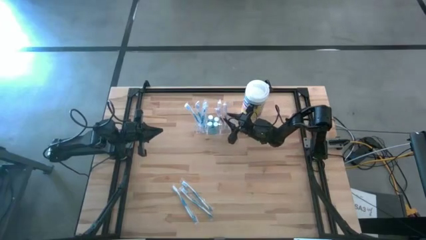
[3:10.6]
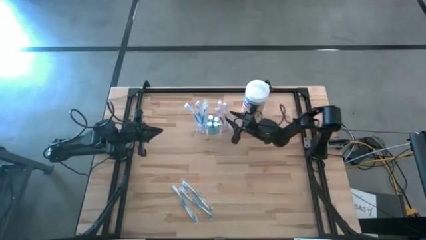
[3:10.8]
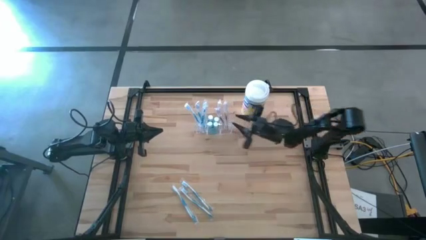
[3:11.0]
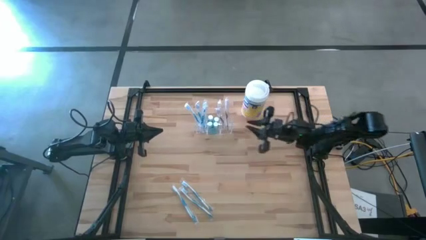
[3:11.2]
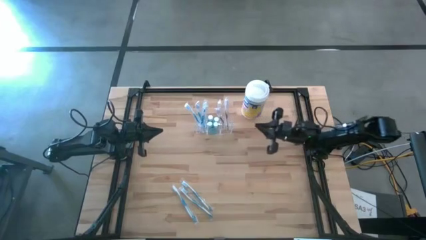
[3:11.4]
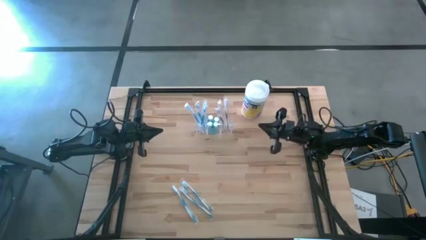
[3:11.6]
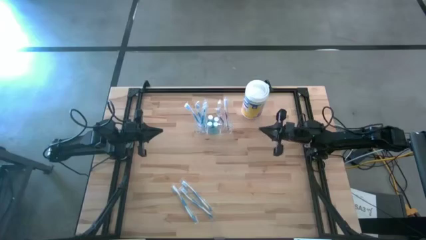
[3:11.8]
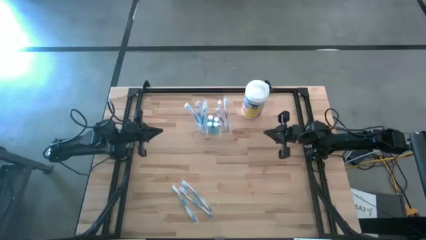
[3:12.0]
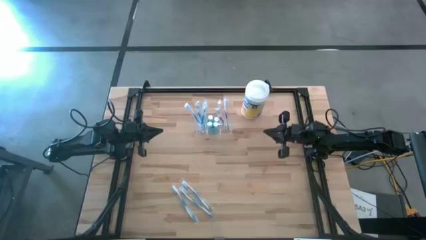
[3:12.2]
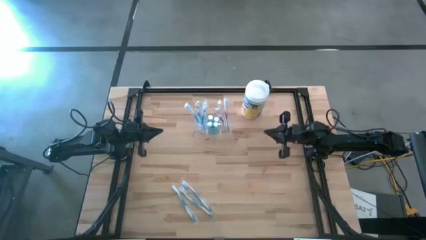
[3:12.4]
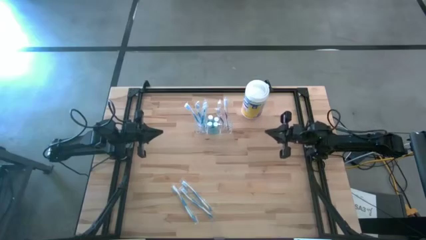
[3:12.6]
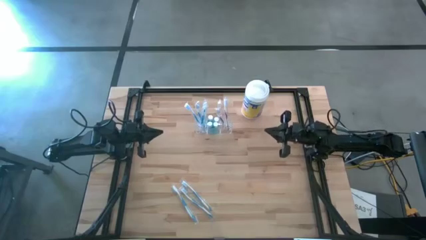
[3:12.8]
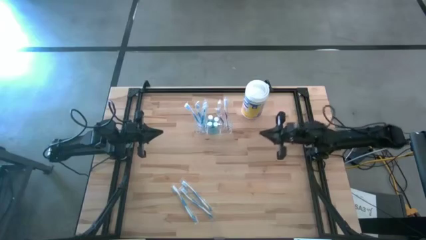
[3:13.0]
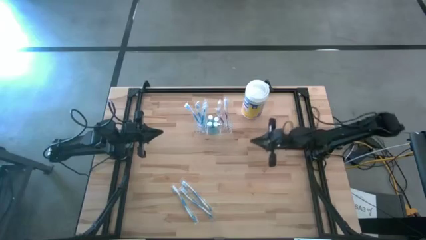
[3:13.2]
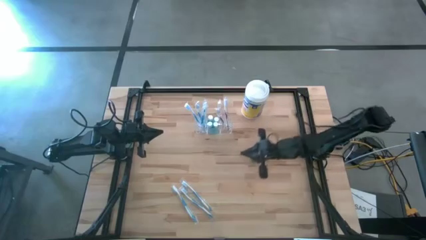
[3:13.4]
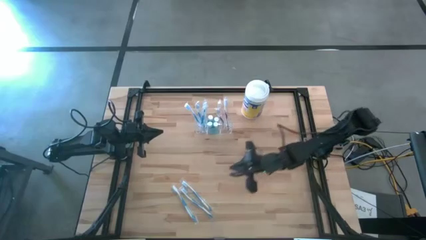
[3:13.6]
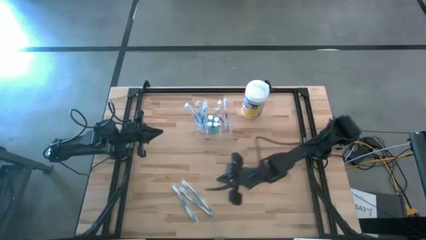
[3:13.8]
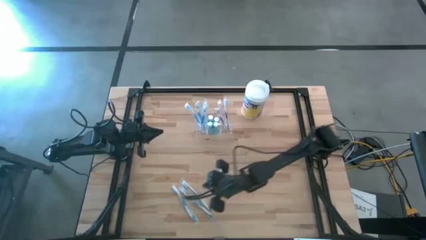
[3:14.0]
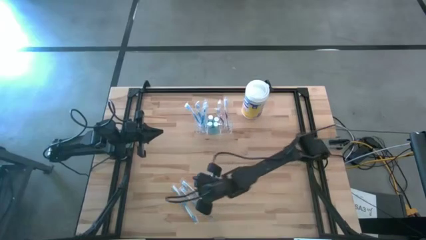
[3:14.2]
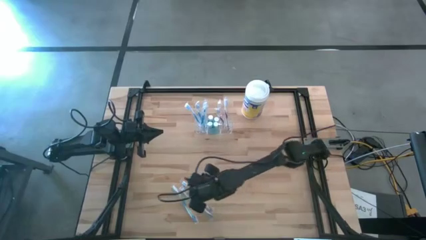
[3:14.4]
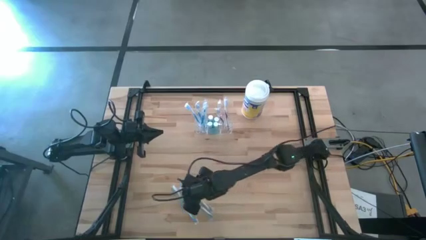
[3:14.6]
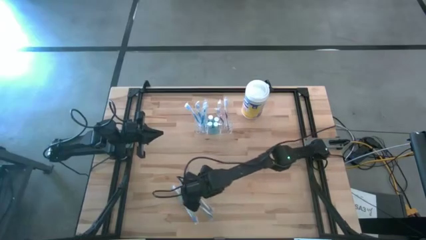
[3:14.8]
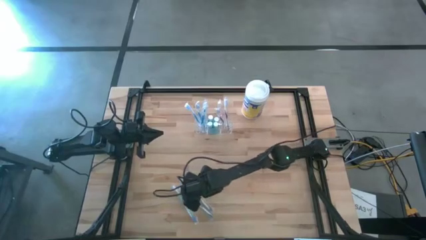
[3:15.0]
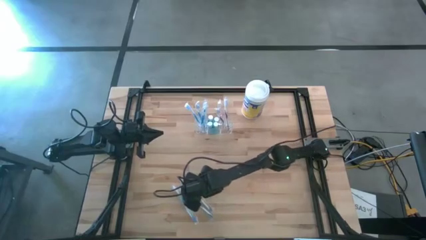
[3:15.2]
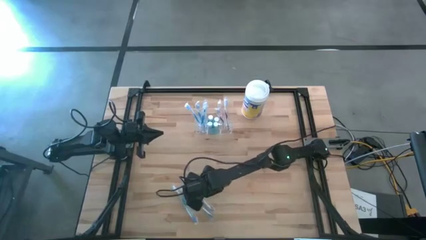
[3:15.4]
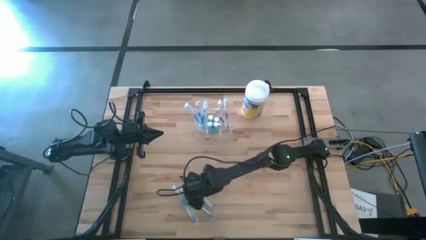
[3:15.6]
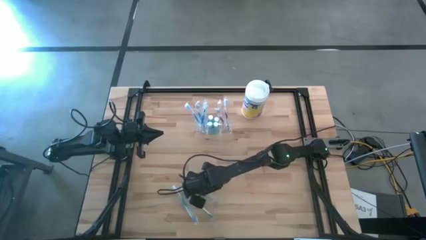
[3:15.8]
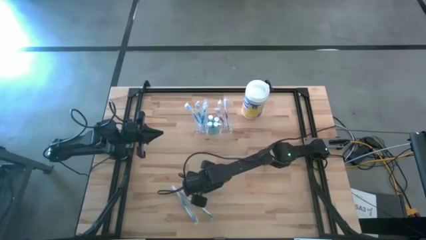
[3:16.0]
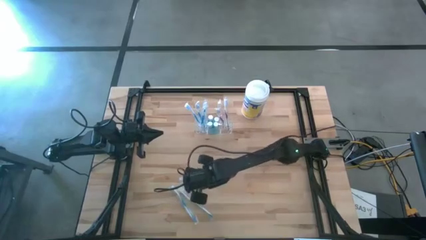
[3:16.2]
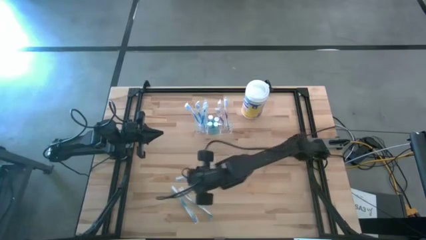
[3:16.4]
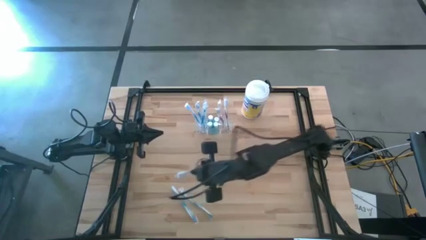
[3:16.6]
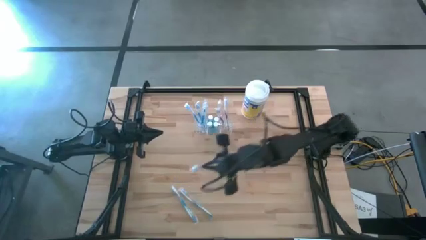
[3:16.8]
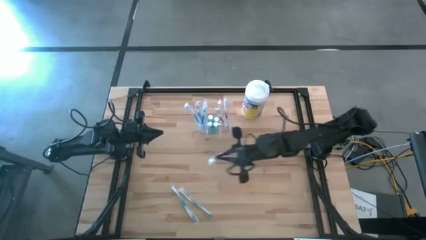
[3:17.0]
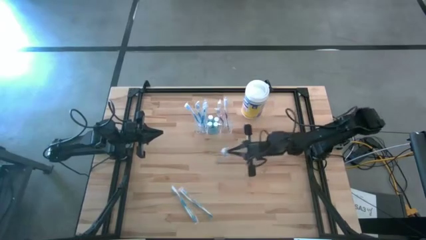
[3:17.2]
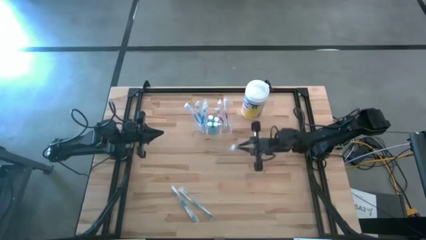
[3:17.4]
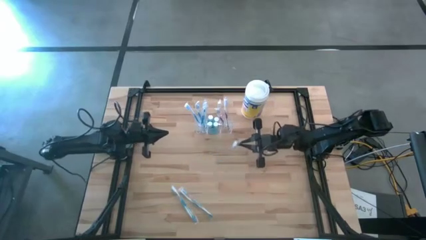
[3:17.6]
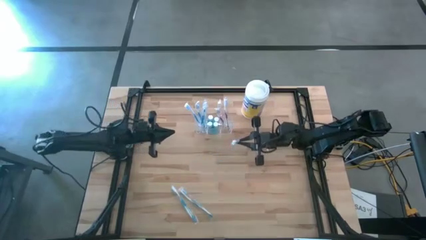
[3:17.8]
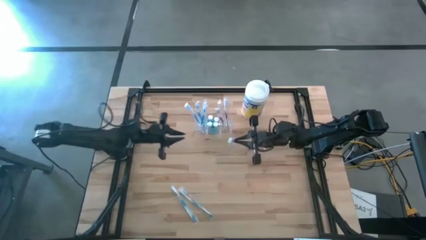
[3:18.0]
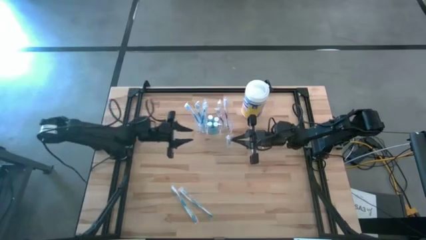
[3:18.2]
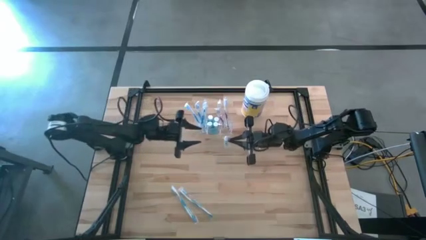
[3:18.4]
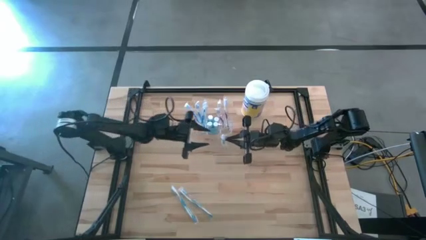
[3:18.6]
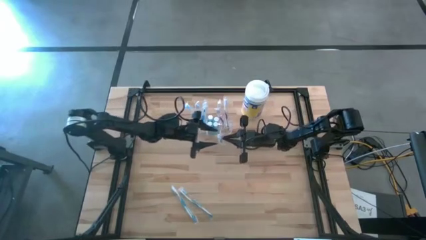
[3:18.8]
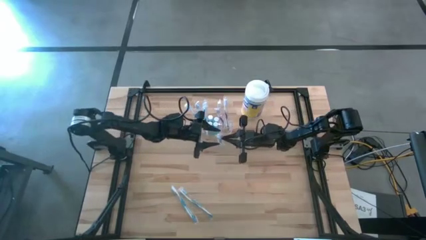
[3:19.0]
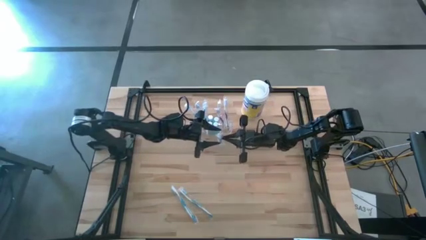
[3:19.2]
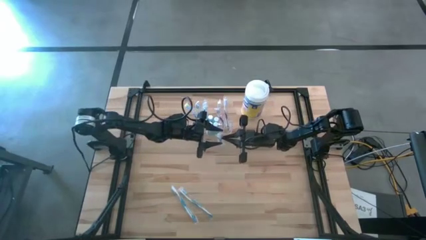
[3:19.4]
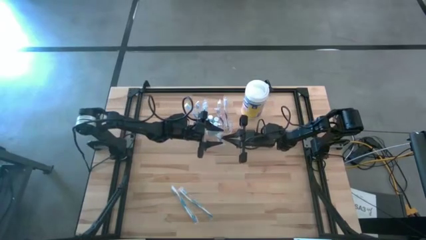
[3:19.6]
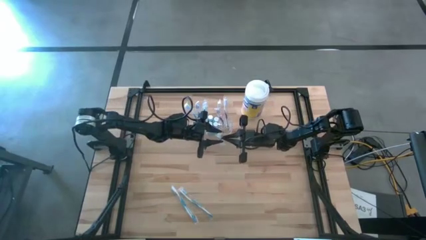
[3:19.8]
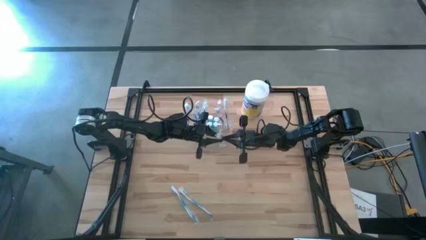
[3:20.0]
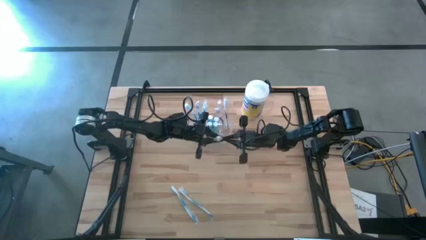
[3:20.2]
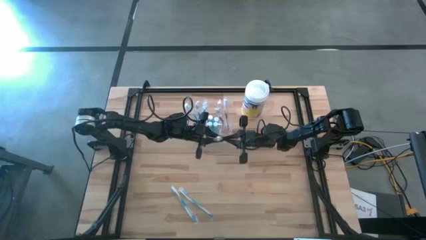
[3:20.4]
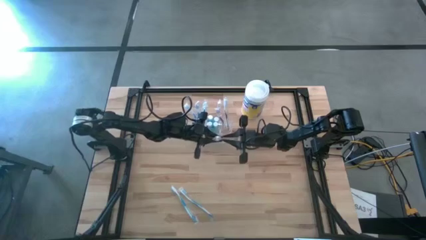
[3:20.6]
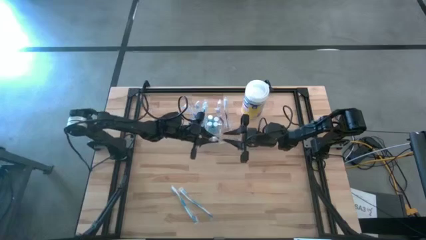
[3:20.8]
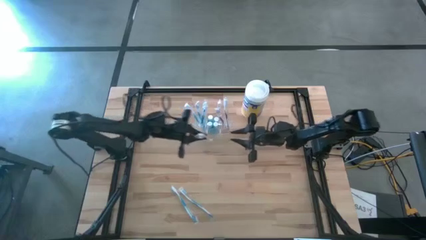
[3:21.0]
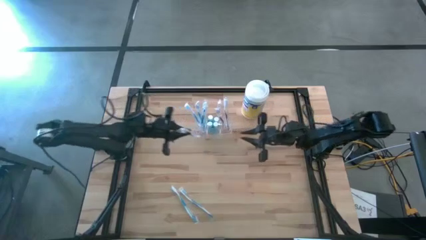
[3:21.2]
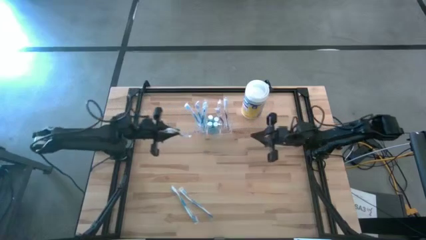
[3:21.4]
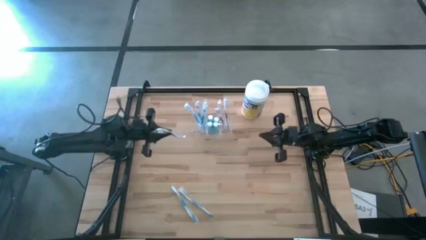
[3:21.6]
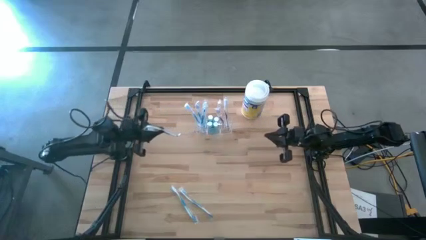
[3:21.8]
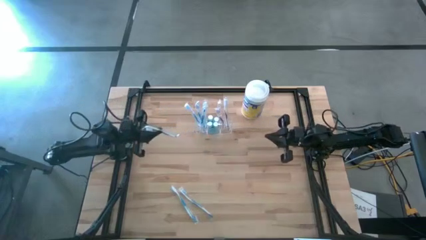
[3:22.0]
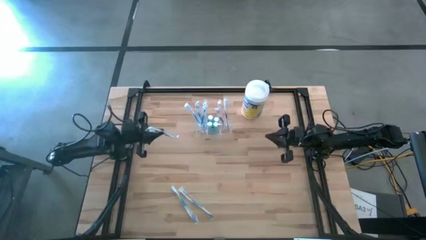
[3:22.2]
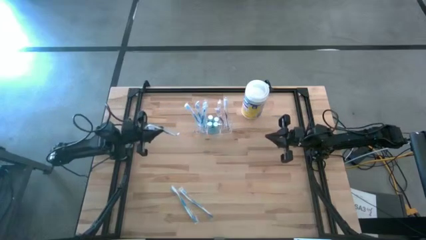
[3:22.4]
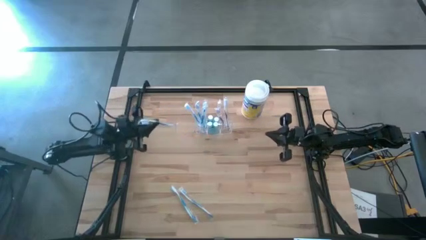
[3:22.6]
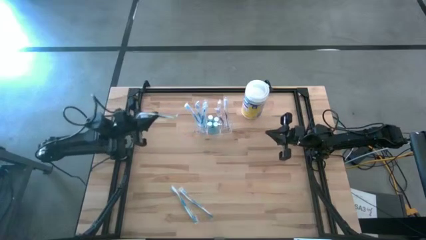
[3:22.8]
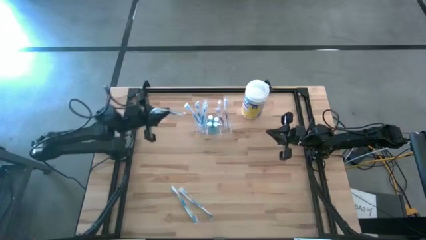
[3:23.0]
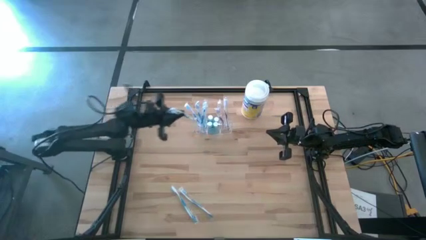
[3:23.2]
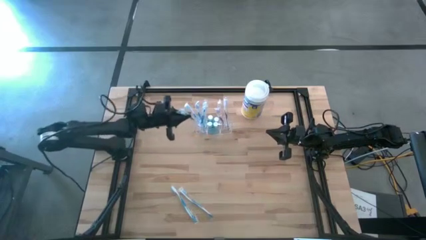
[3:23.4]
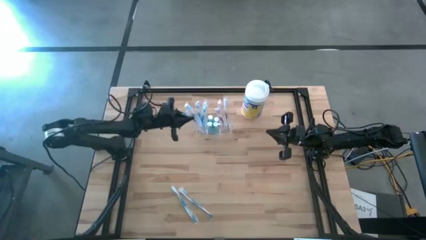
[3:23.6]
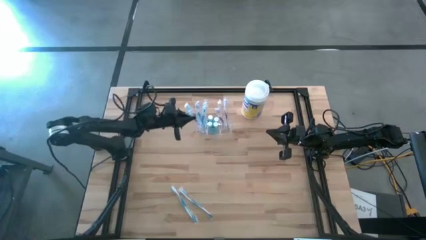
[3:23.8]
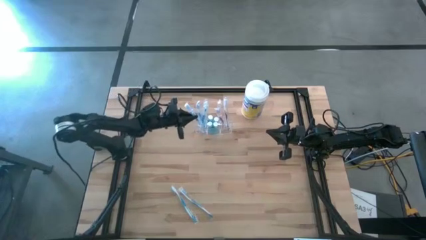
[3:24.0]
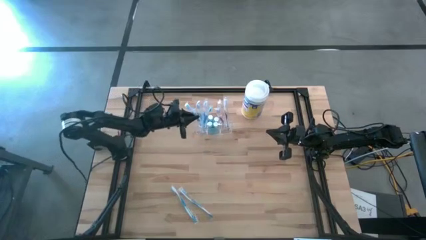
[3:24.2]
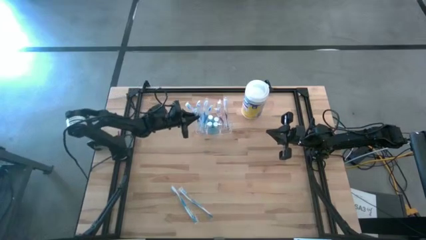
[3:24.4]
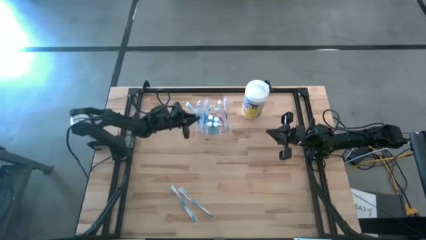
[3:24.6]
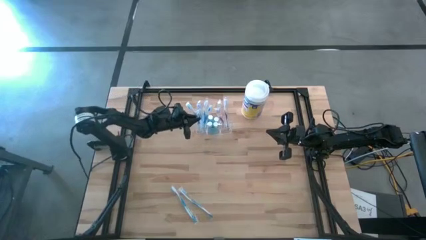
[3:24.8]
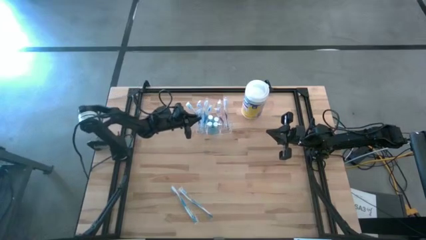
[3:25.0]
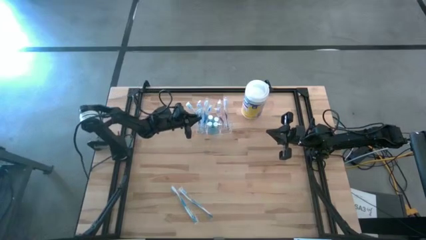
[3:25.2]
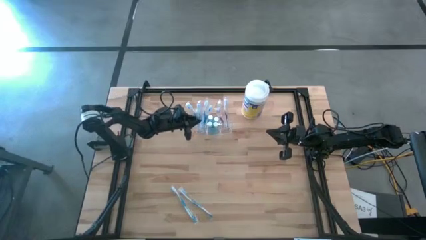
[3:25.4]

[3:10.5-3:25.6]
Task: Pick & Place toothbrushing station
Put the blue toothbrush into the transparent organizer
